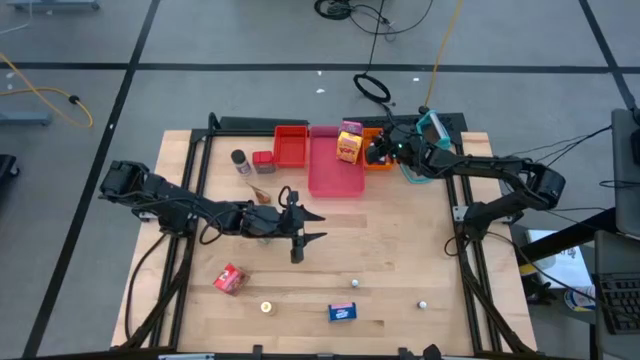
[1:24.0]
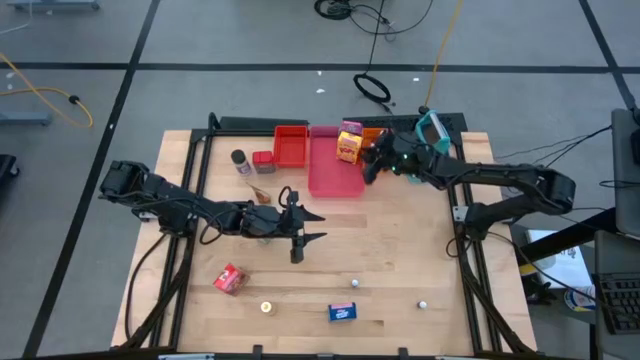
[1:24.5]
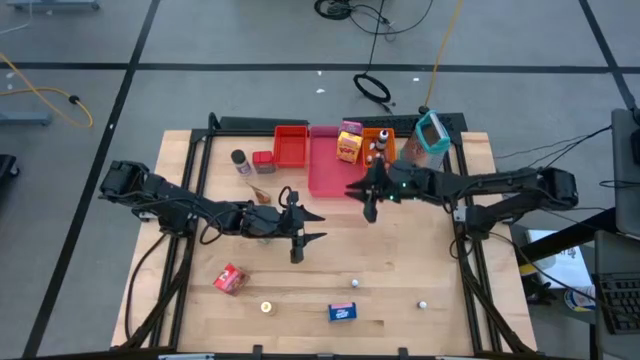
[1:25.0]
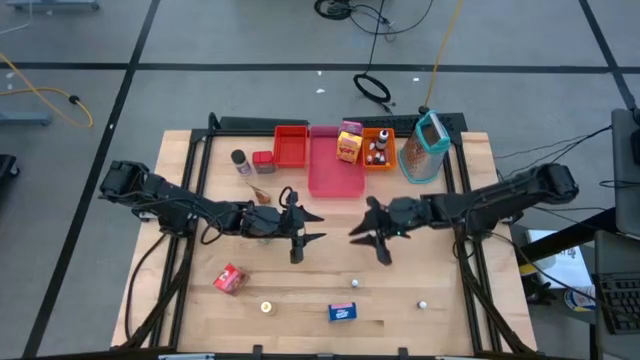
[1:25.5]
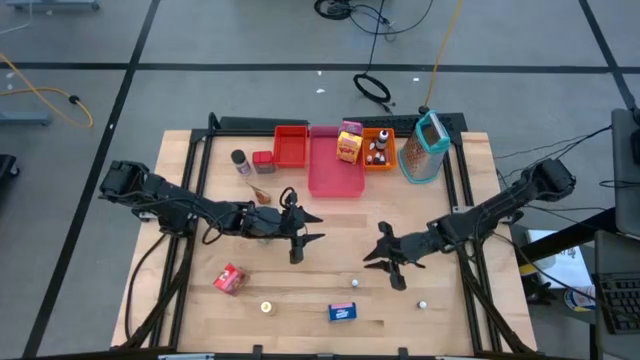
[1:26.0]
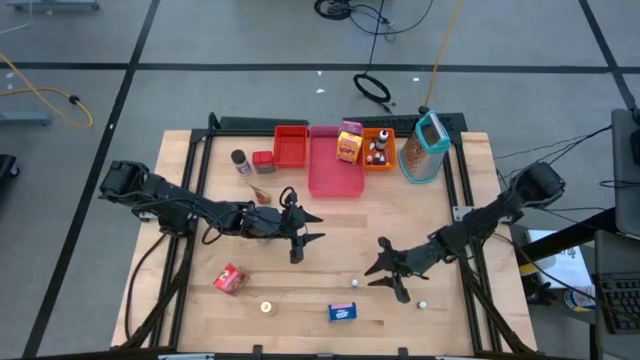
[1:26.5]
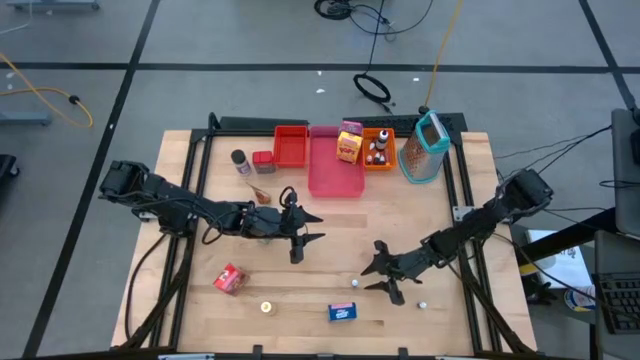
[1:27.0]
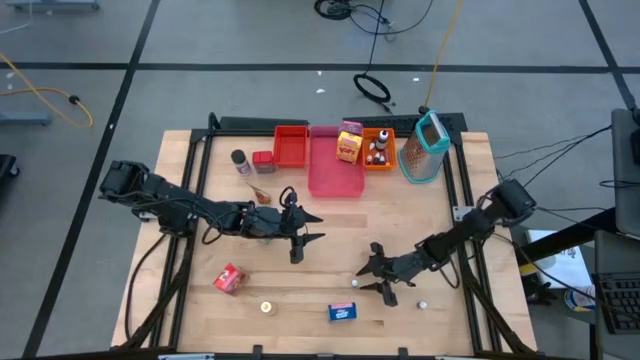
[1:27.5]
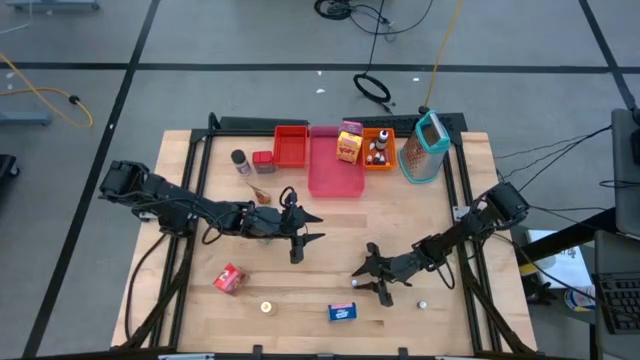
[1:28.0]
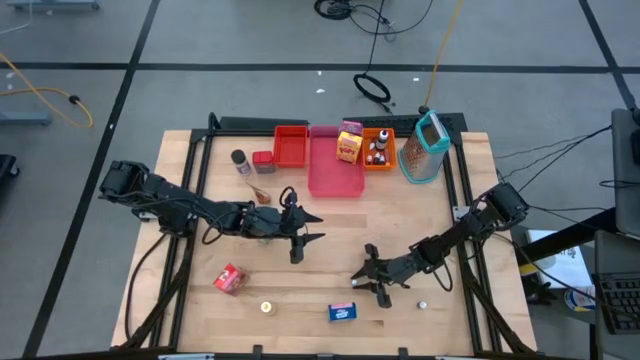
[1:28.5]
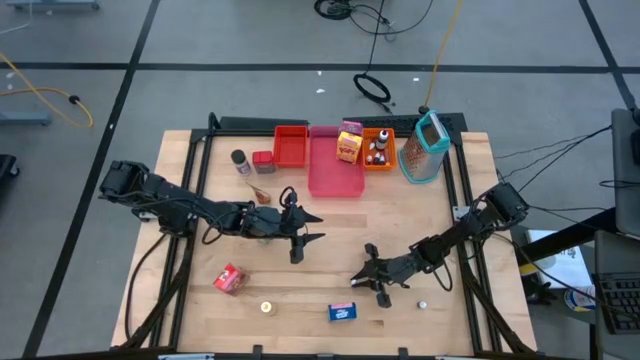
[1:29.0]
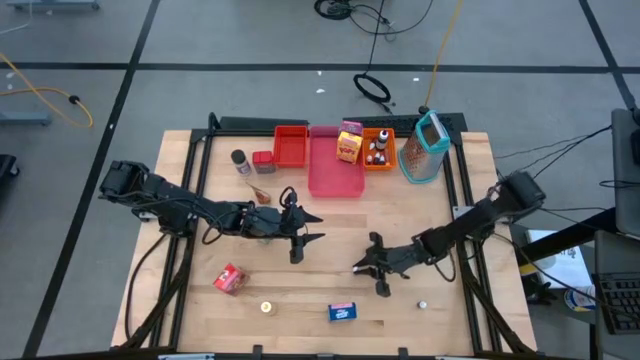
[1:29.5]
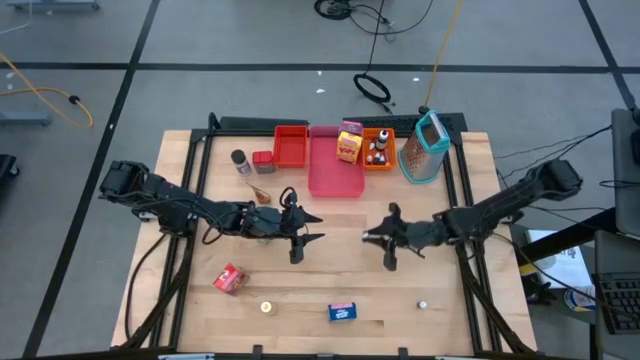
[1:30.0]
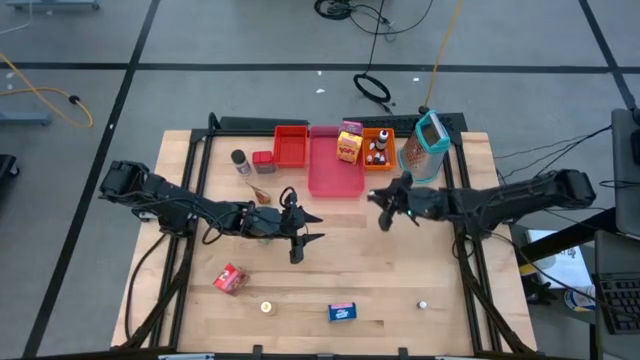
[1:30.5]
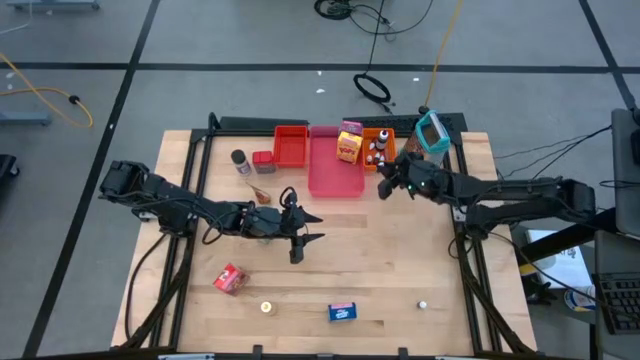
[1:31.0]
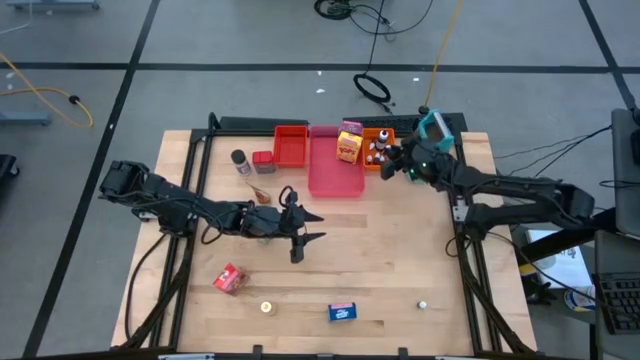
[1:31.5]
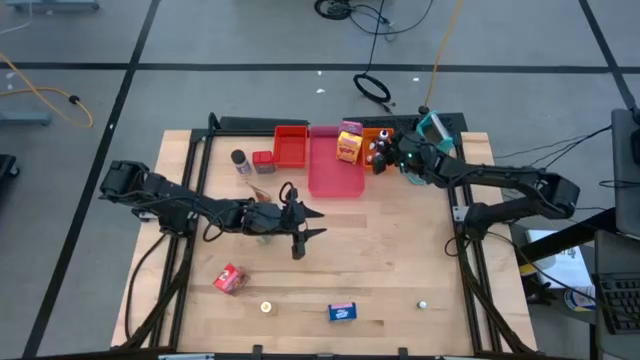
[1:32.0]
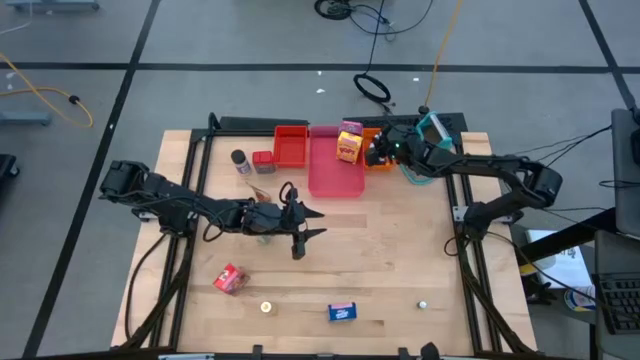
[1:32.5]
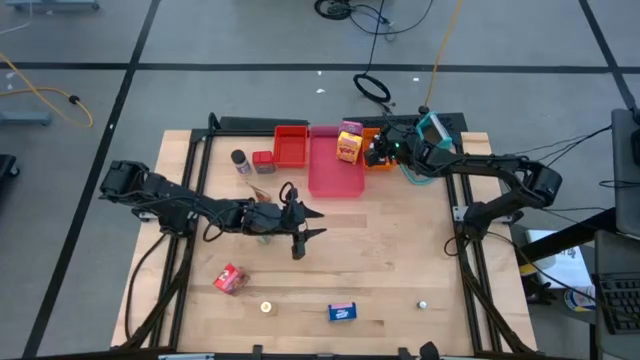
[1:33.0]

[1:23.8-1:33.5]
Task: Pick & Place Kitchen Items
Put the black food coloring bottle into the orange bin

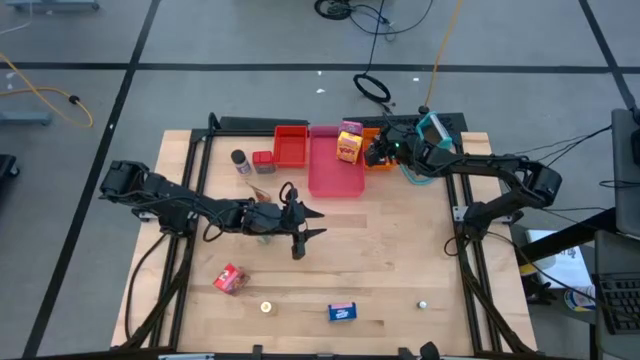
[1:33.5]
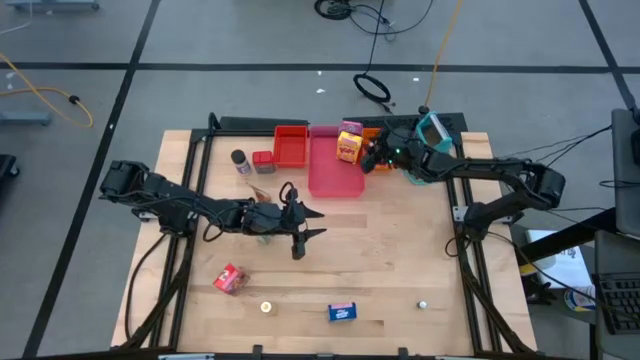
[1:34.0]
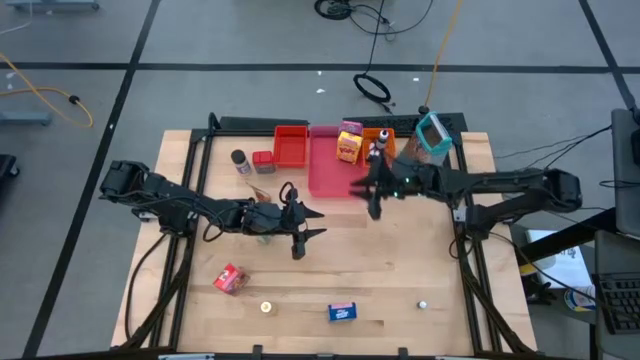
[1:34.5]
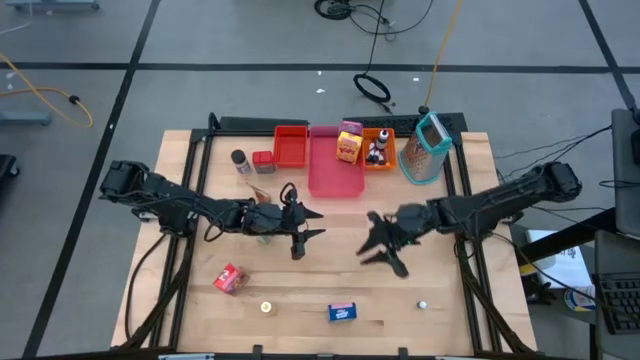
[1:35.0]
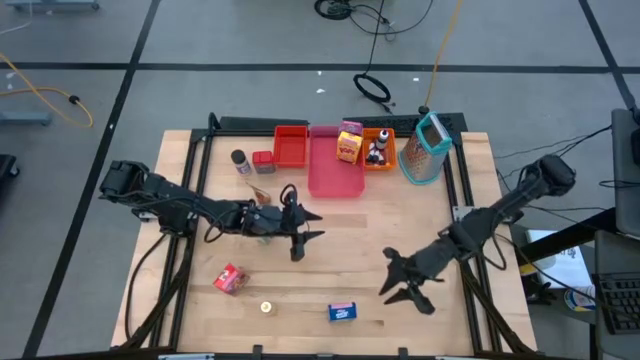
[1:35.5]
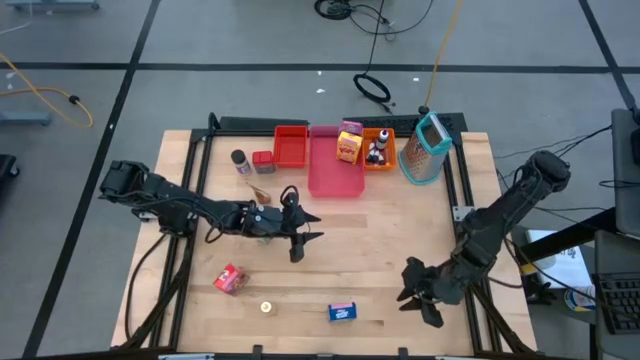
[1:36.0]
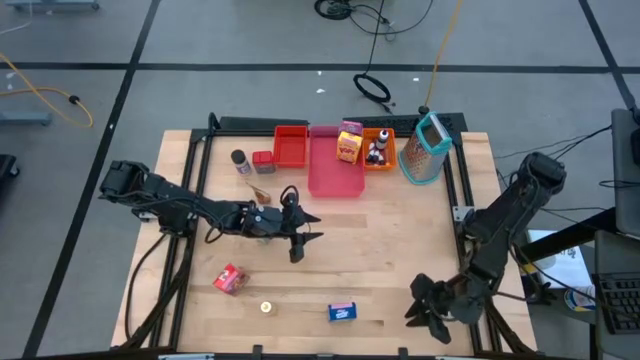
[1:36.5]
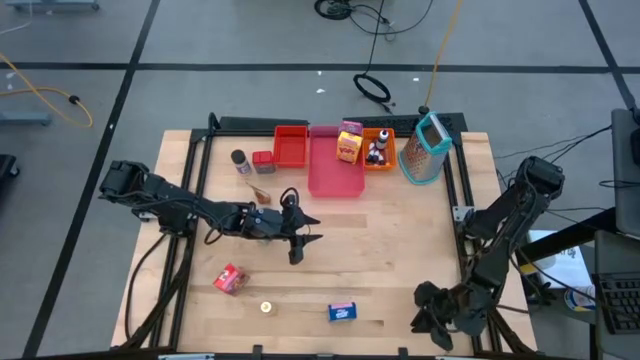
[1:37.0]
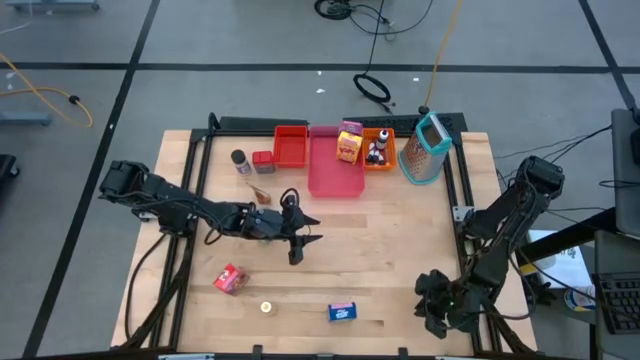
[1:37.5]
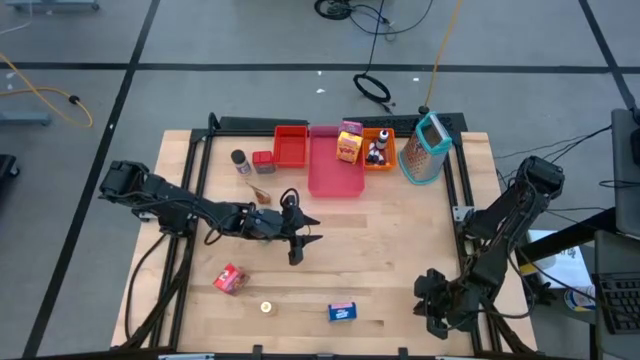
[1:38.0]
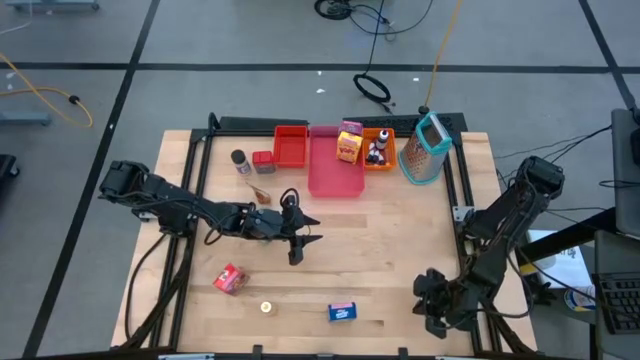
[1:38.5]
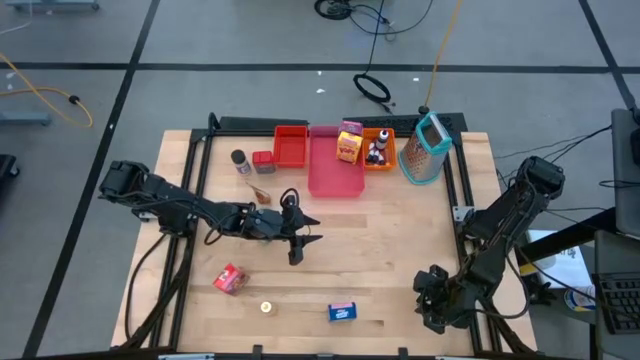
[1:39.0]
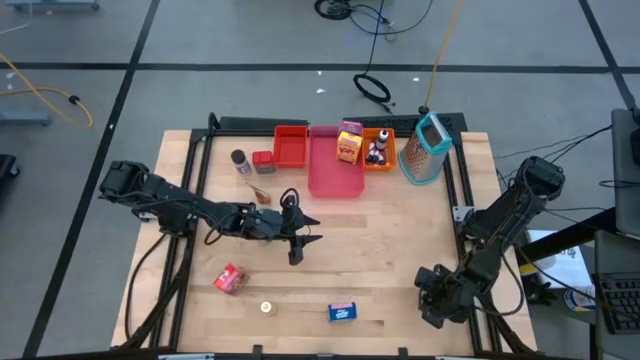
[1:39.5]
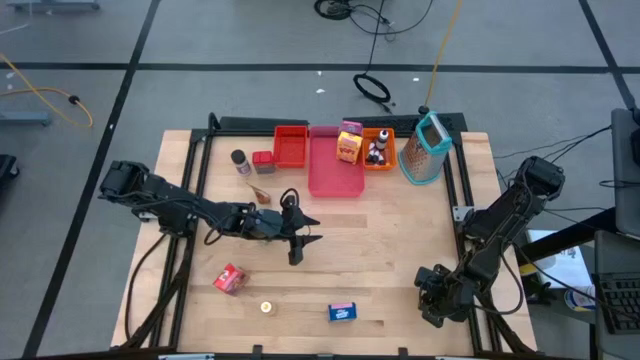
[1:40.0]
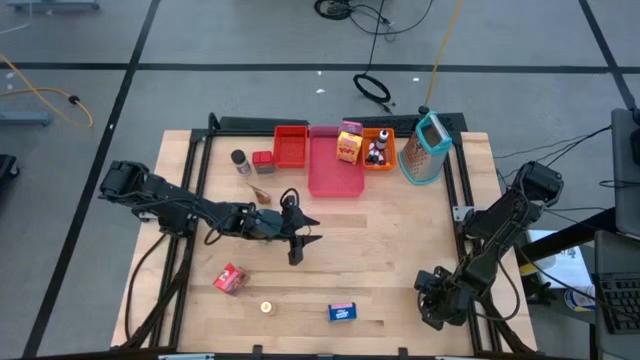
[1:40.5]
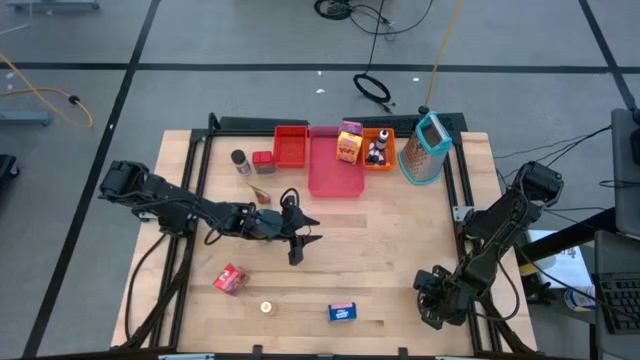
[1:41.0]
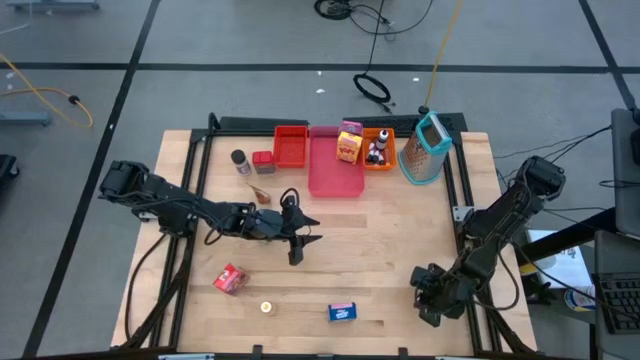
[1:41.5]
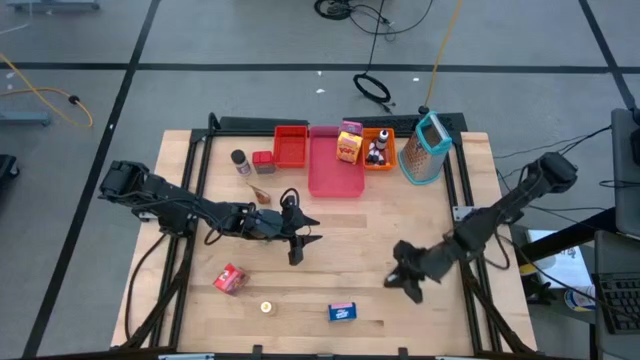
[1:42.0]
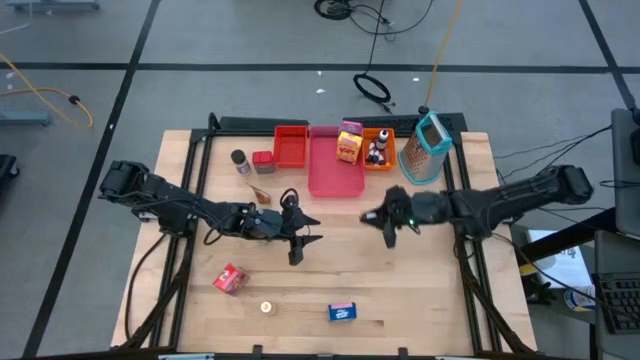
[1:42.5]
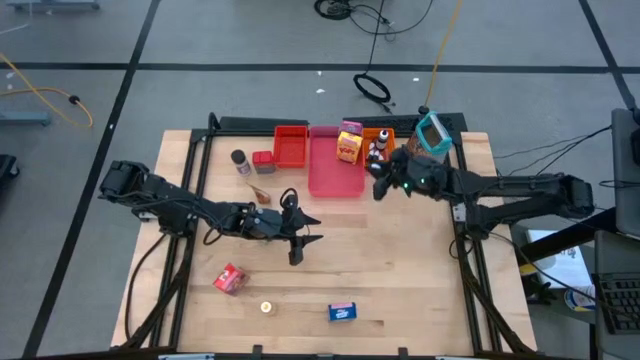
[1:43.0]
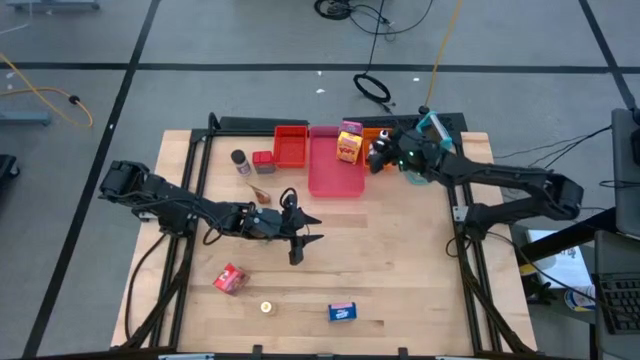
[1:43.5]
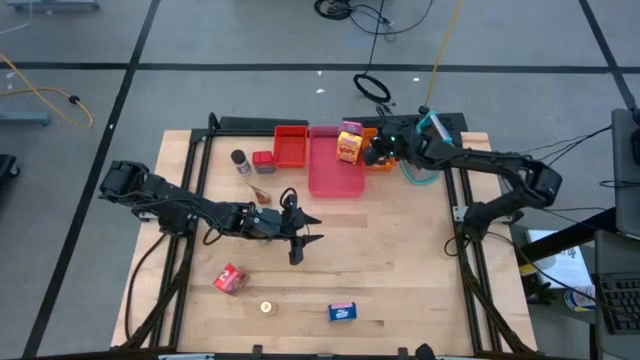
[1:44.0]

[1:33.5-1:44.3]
Put the black food coloring bottle into the orange bin

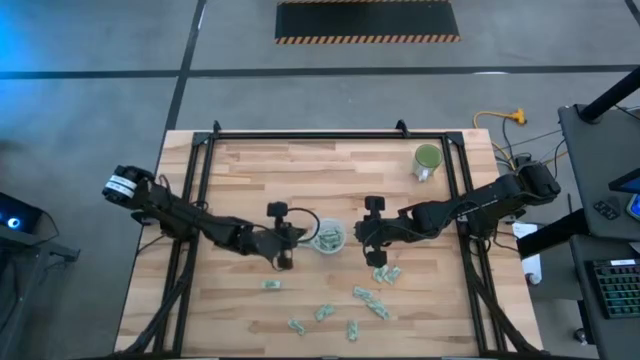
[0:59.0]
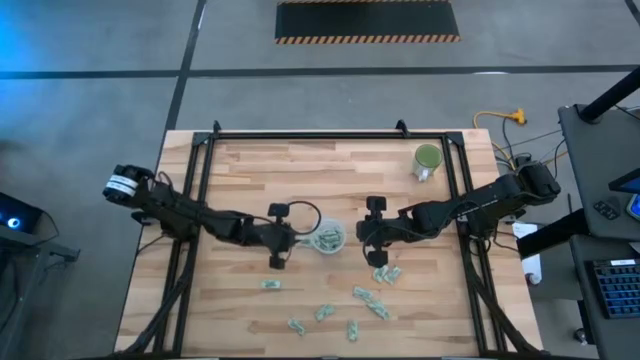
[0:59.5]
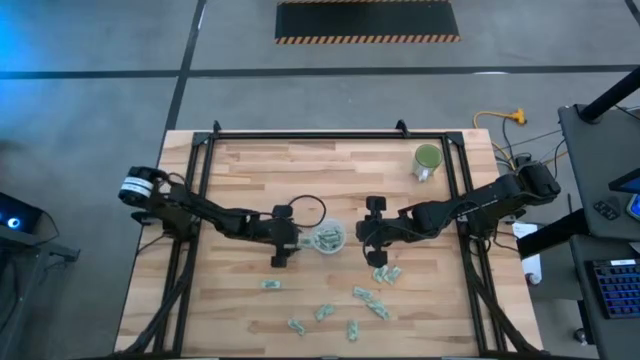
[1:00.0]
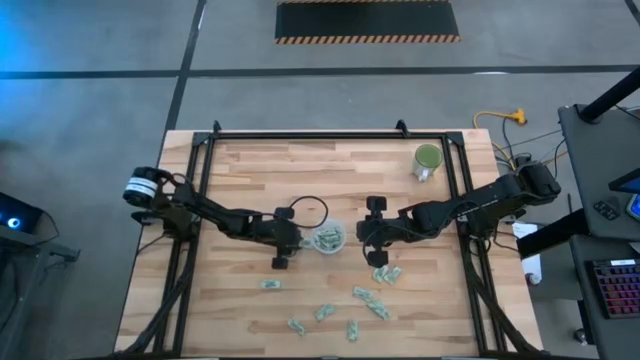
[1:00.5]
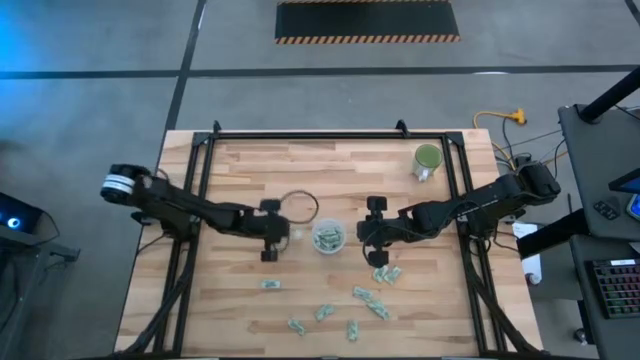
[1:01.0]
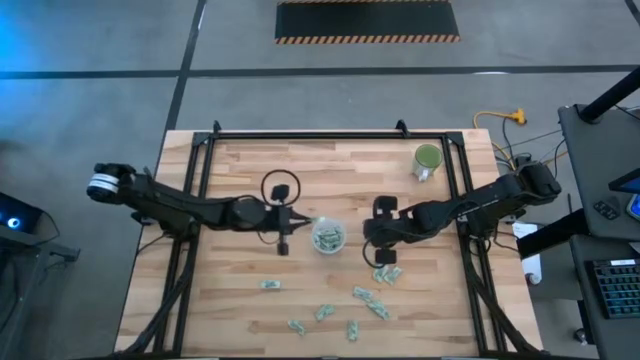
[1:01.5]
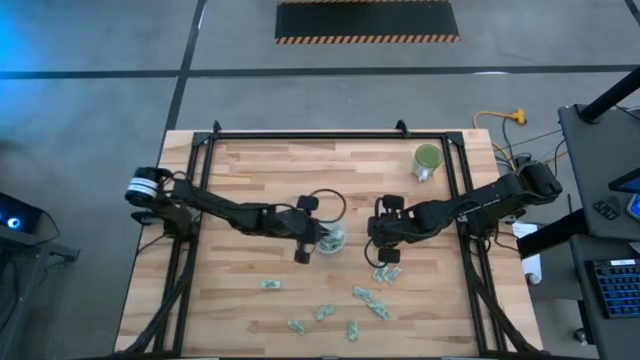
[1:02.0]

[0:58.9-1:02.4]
Task: Pick and place Stevia / Truvia into bins
Put the light green stevia packet into the transparent container
